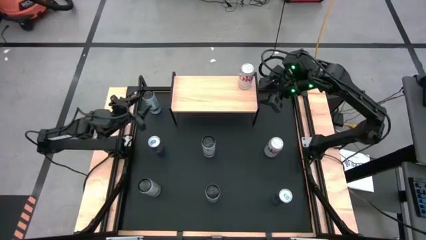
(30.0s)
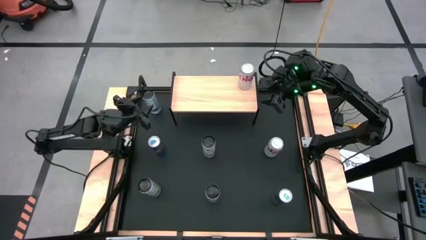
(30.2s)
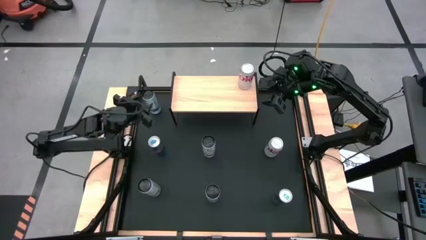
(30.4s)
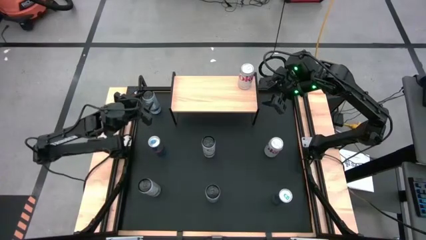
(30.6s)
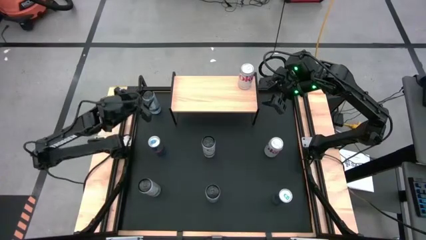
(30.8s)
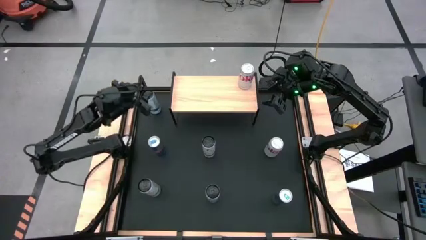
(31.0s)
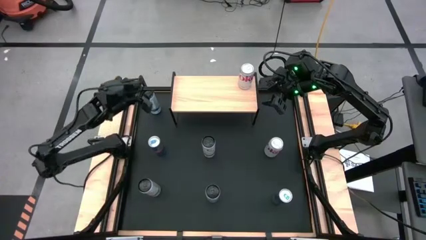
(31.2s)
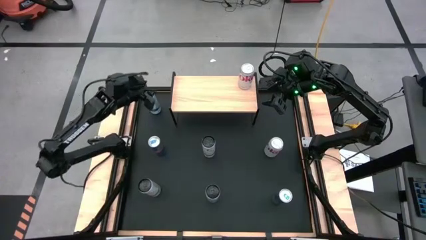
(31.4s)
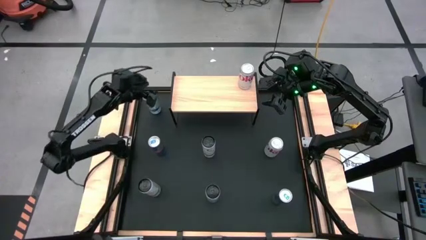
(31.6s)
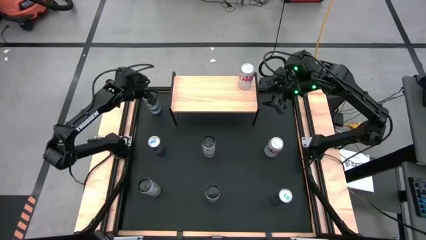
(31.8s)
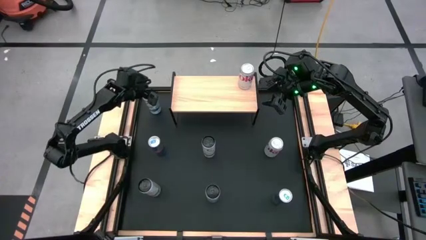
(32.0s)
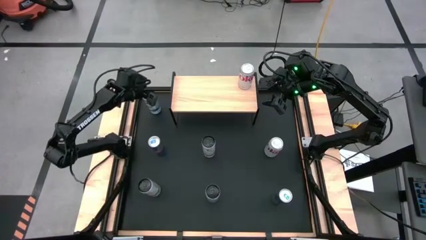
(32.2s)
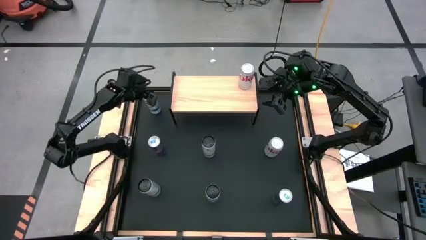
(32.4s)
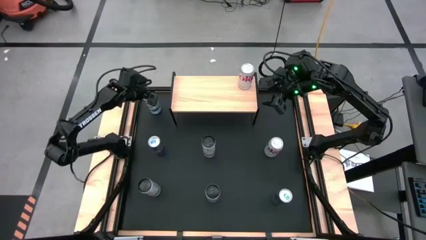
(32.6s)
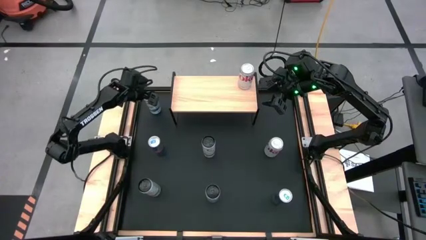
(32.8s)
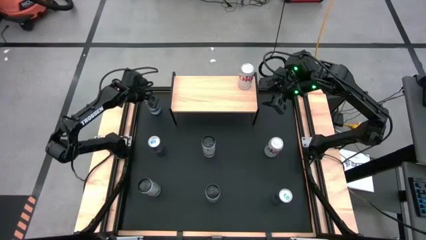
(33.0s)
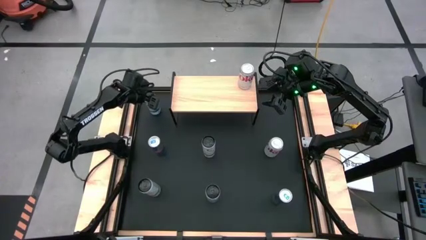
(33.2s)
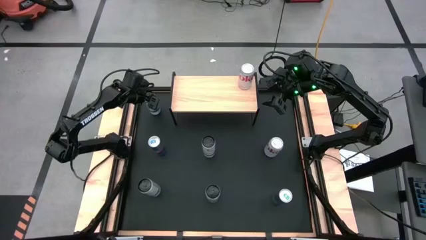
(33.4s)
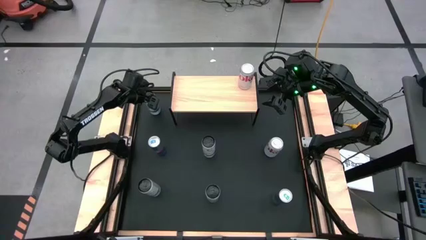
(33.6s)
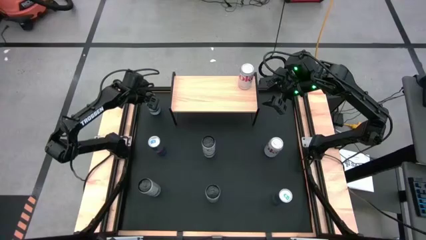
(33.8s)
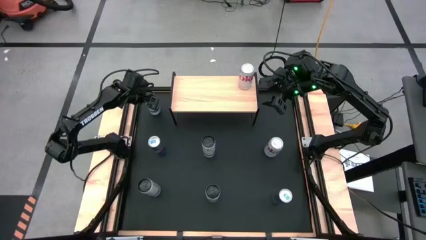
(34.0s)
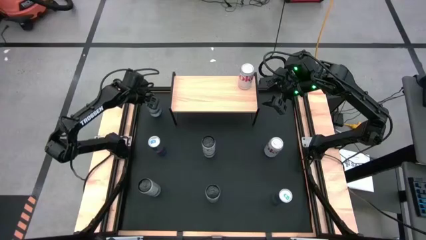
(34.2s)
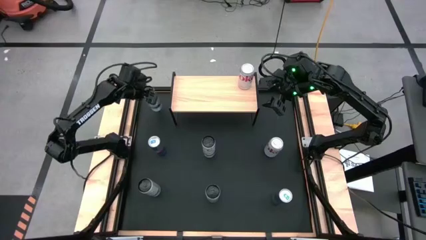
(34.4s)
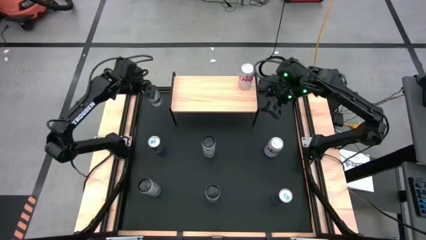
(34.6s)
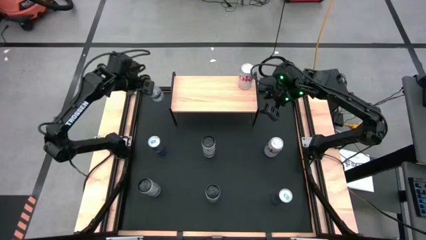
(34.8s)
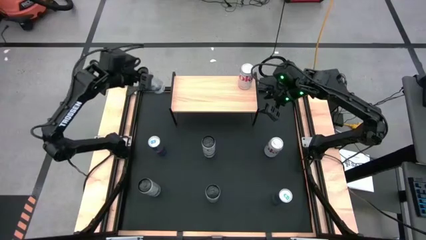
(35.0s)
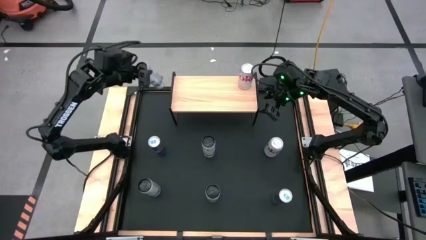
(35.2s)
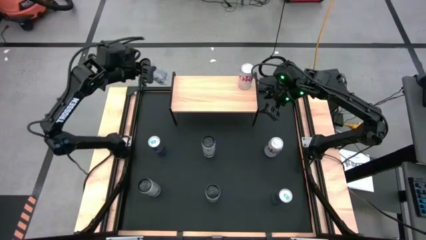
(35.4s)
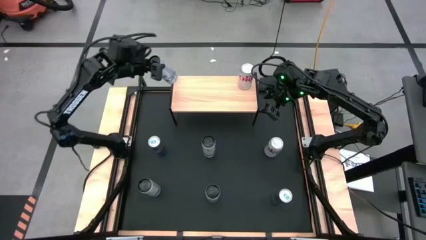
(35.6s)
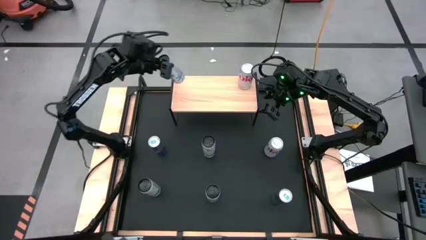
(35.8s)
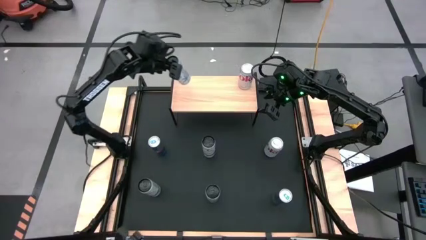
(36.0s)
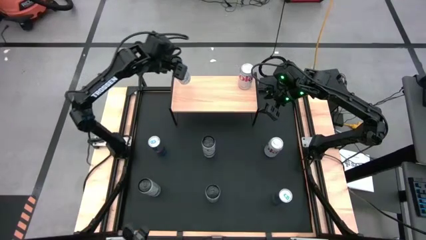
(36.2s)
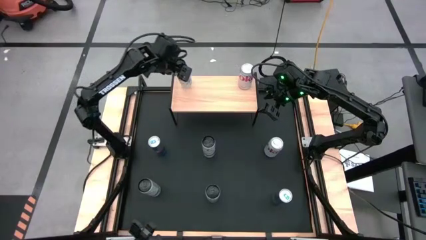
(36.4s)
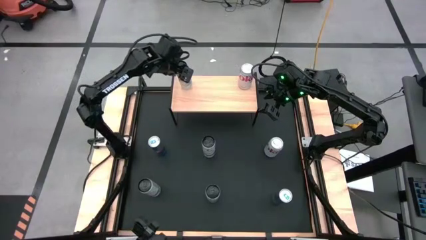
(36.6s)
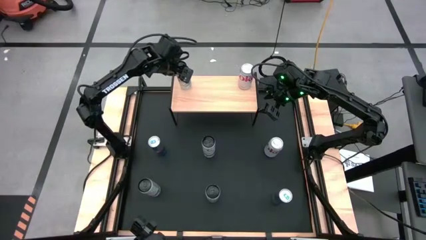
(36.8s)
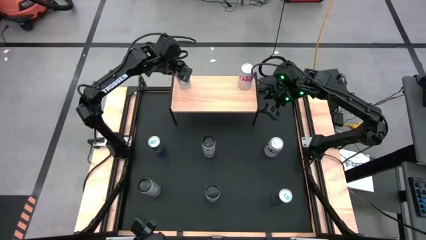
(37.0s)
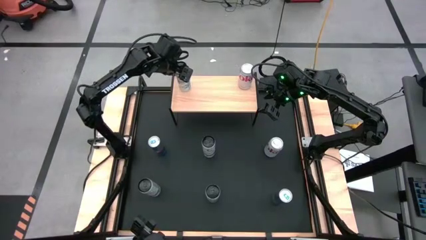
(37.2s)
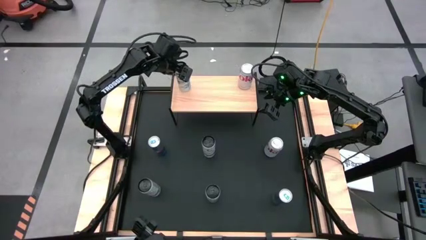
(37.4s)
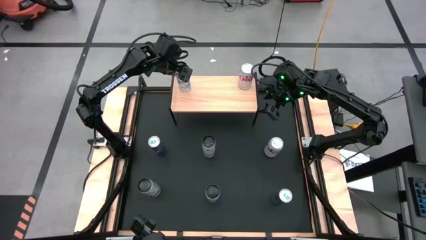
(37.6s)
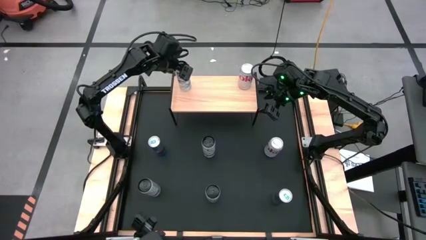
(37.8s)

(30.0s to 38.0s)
Task: Place canned beverage on shelf
Put the top left white and black soda can on the shelf

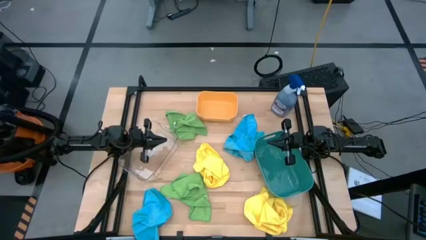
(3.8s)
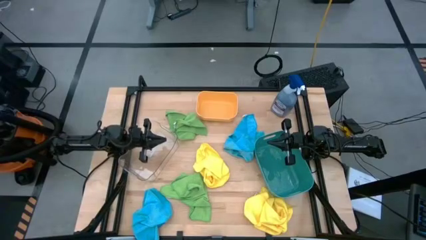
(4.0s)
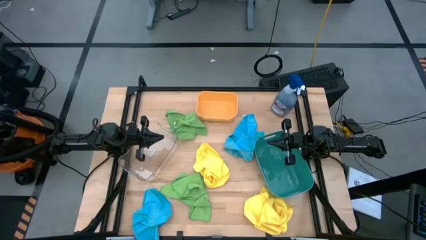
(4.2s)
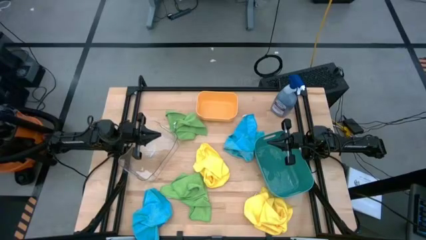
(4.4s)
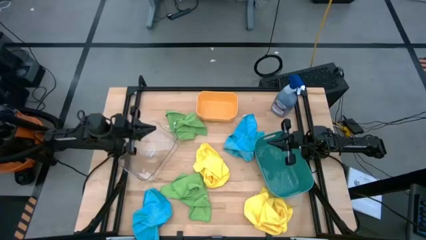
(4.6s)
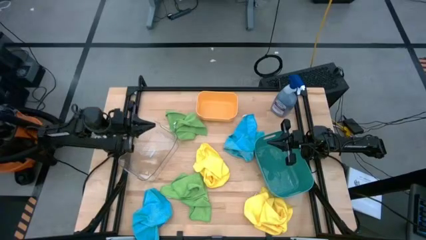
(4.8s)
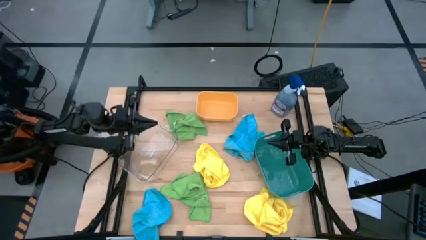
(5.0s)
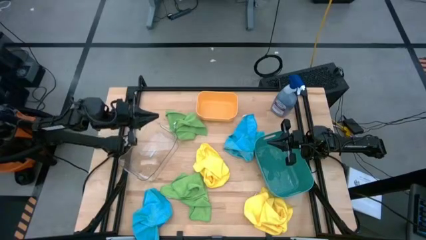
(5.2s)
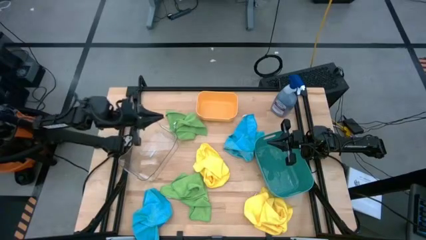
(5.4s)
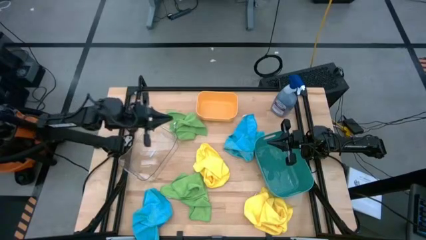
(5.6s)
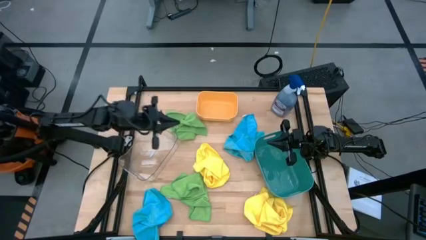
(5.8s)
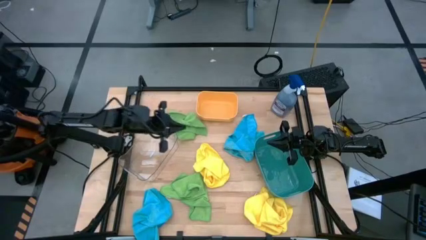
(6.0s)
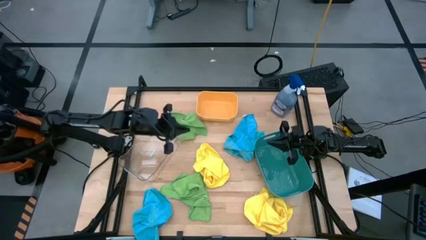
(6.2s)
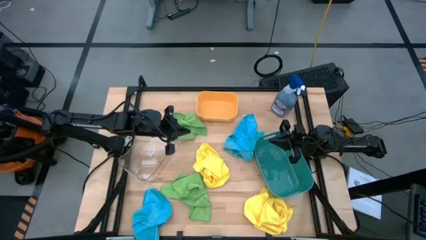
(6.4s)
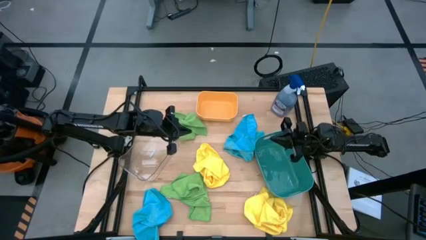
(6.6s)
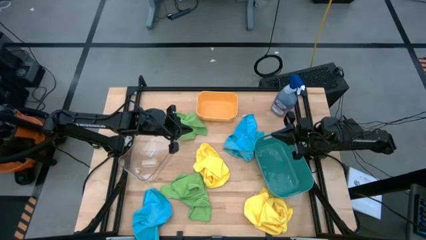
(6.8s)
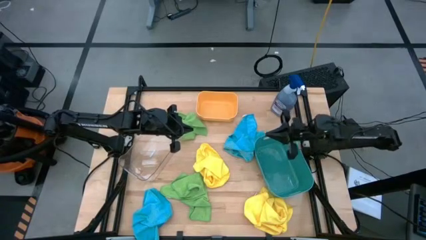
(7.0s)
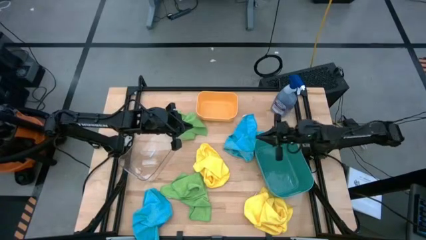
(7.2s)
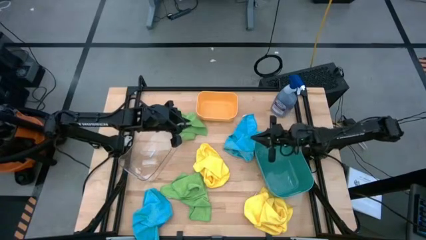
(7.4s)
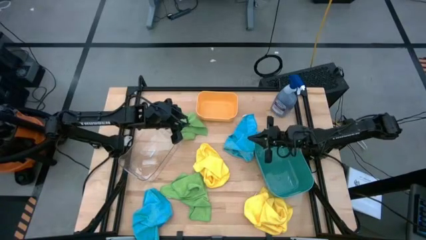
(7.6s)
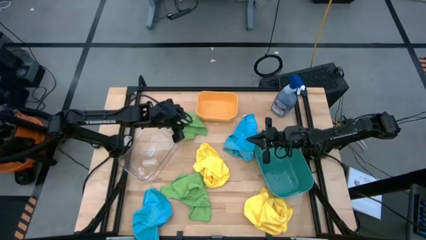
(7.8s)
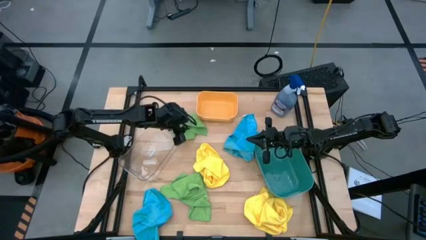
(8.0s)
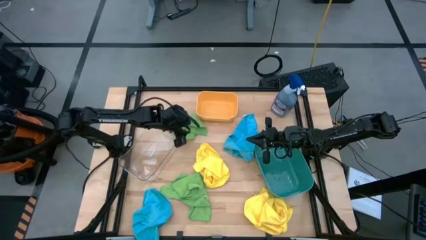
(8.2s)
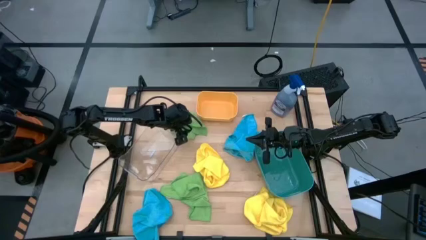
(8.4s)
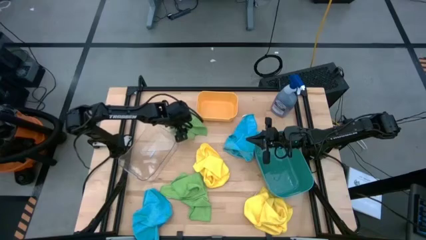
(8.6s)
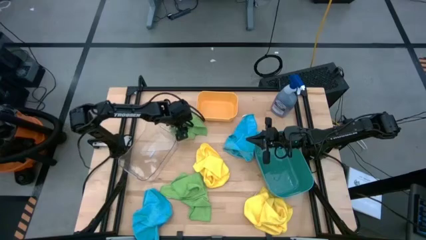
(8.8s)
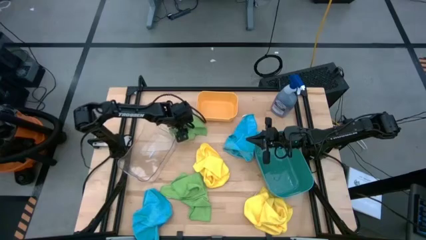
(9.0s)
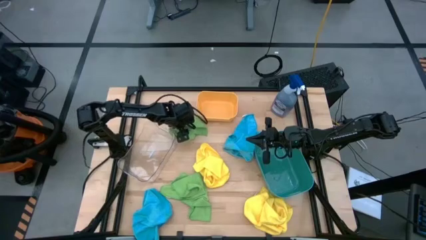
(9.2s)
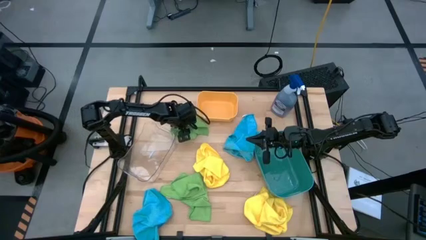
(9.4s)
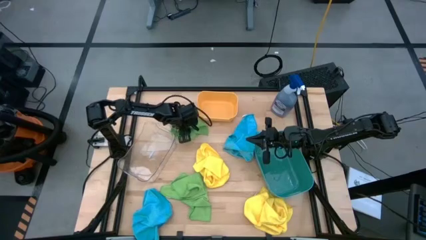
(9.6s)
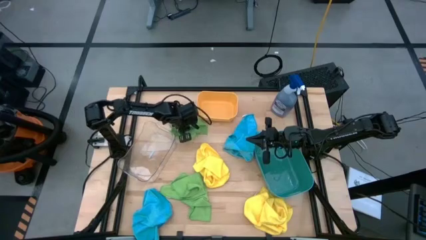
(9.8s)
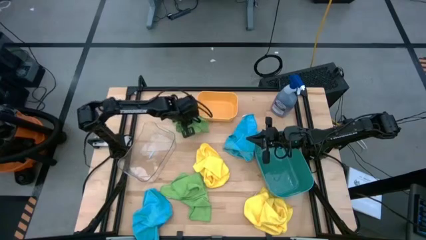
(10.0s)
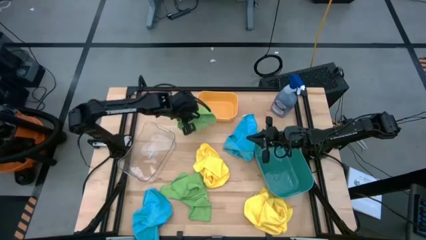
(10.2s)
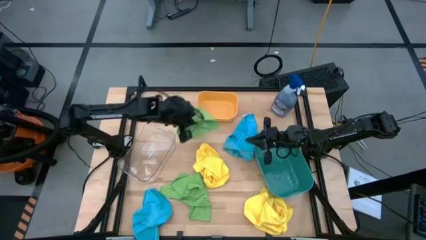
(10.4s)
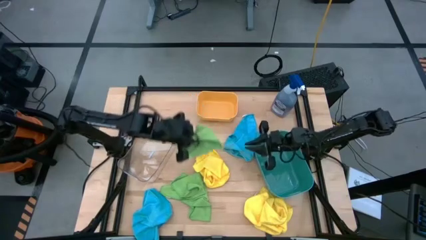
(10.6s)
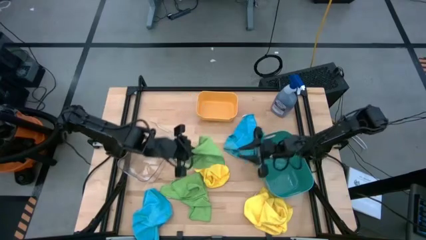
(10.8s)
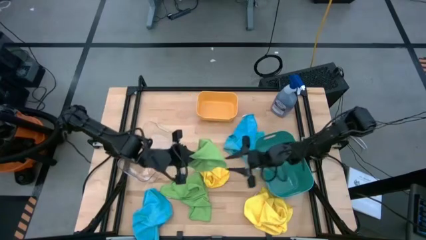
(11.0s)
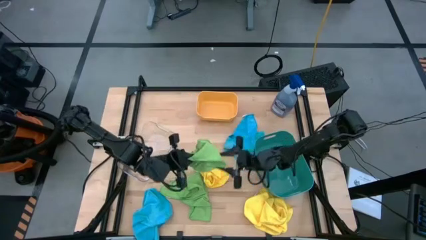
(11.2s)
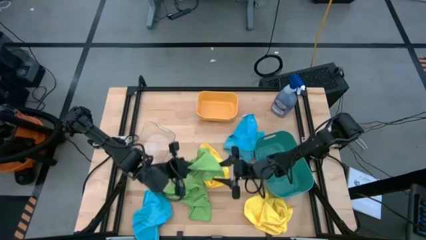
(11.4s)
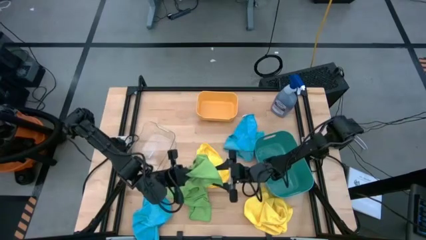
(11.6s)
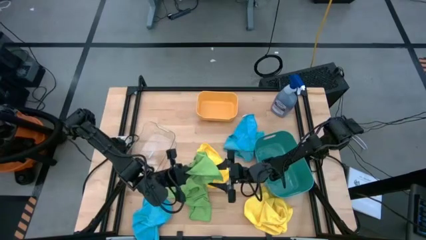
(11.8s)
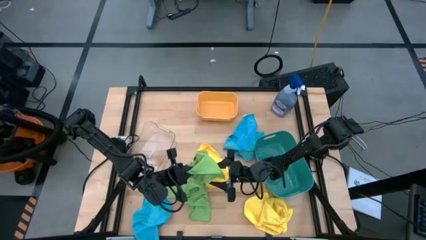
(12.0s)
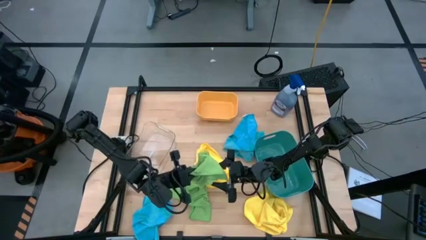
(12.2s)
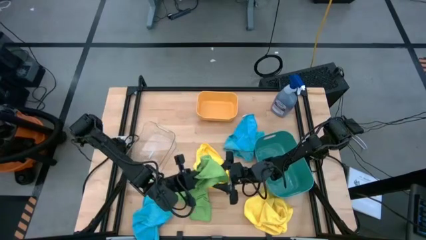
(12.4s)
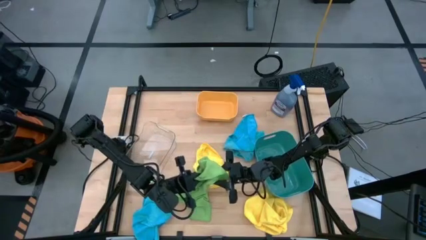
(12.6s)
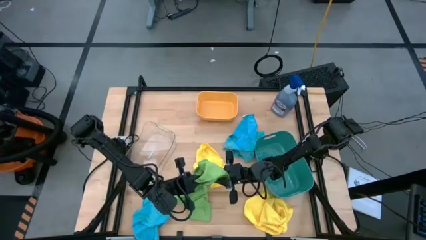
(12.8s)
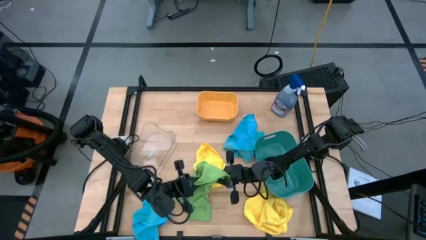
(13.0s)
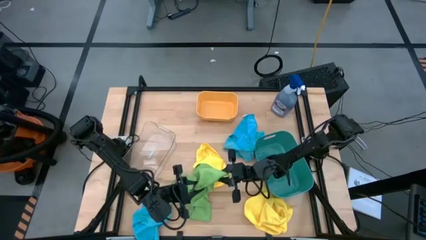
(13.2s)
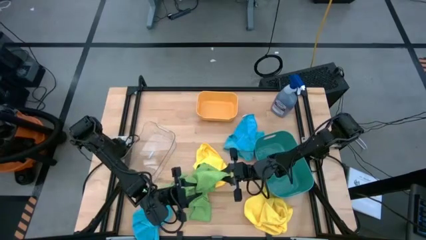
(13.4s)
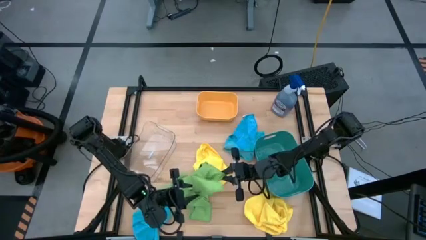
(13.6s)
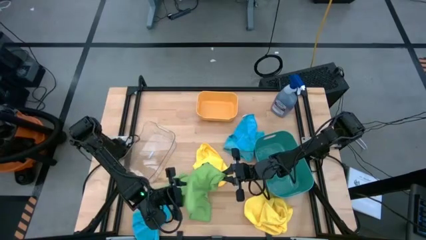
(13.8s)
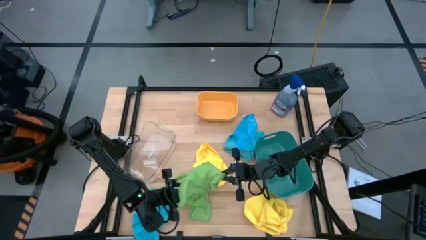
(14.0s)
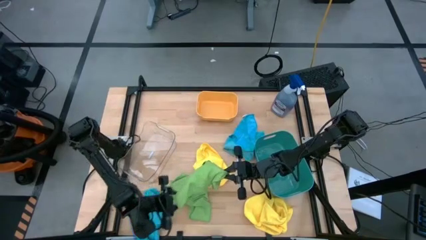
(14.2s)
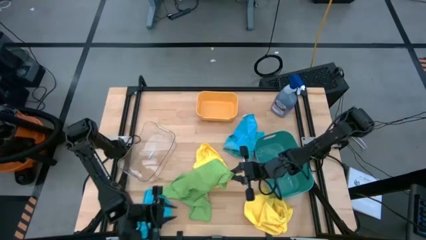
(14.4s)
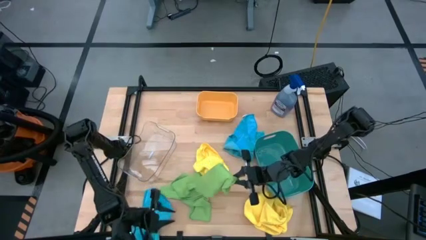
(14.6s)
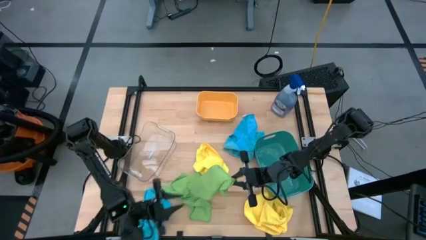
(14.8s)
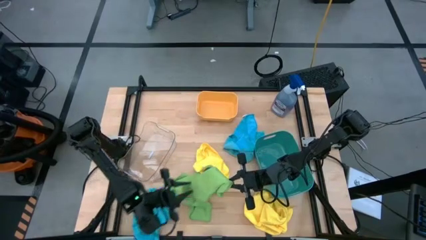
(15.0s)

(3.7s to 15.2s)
Task: Sort microfiber towel by color & place in baskets
Put the top green microfiber cloth into the orange bin
